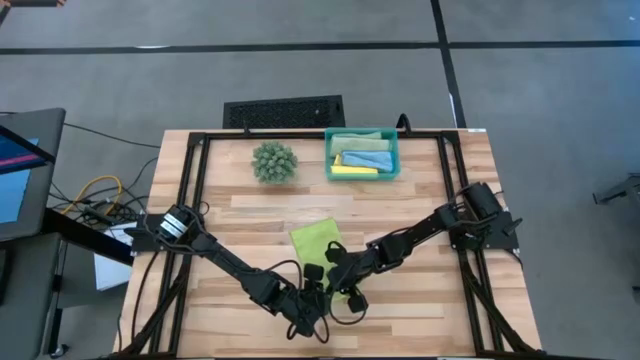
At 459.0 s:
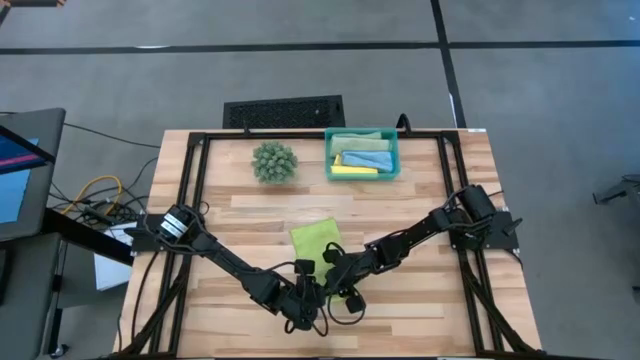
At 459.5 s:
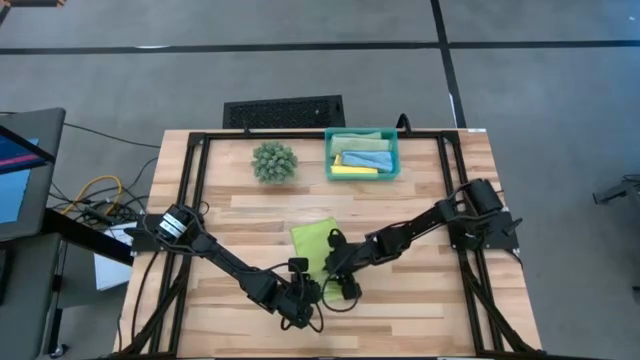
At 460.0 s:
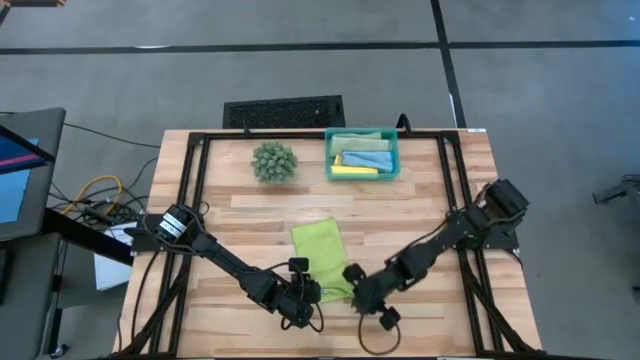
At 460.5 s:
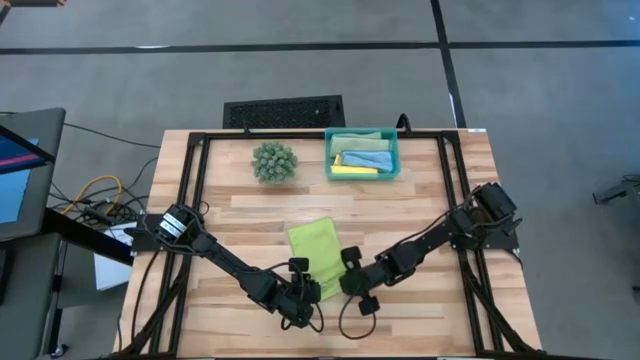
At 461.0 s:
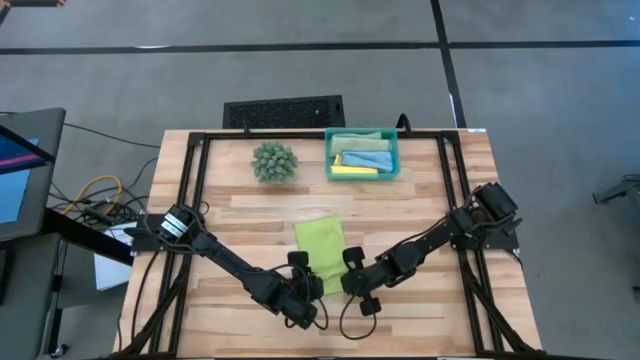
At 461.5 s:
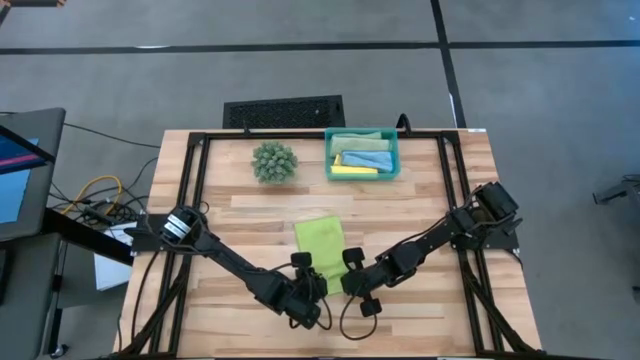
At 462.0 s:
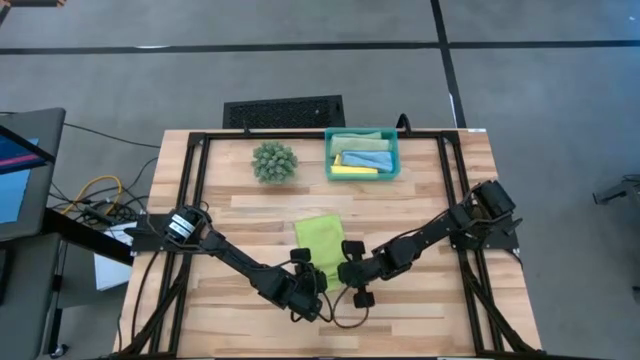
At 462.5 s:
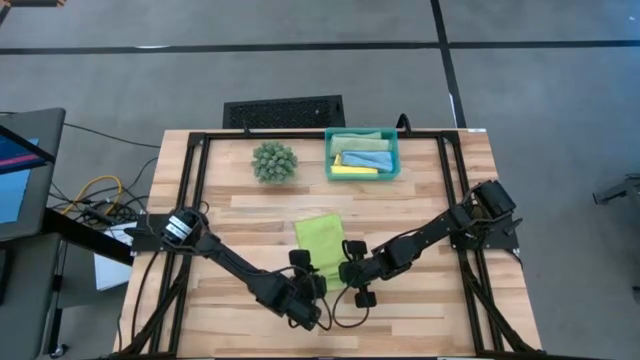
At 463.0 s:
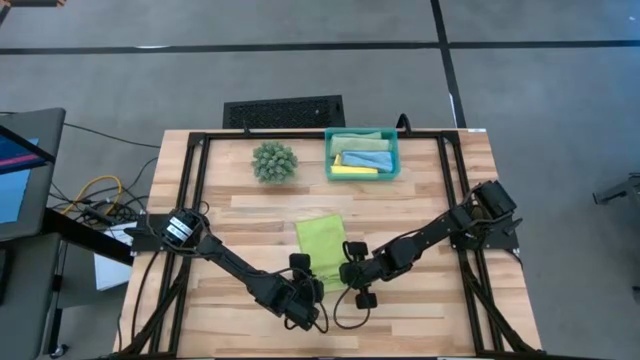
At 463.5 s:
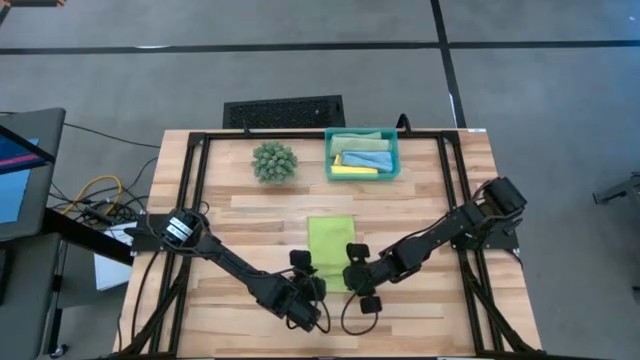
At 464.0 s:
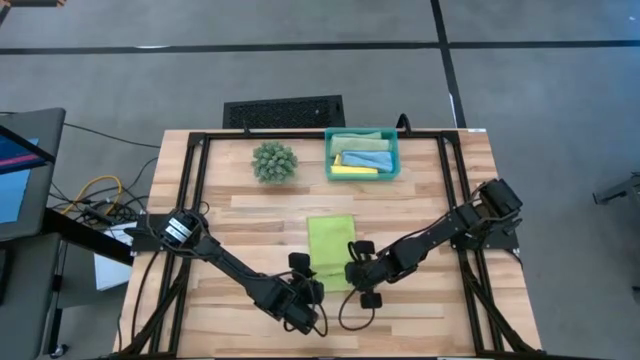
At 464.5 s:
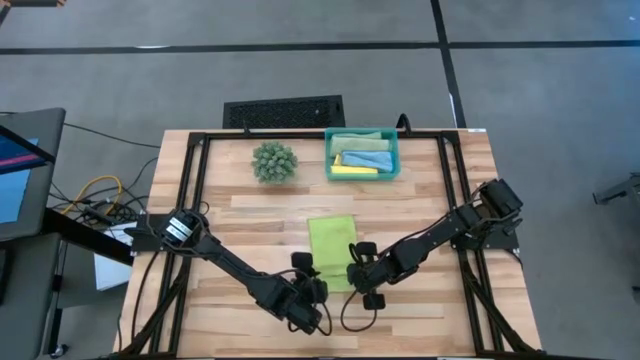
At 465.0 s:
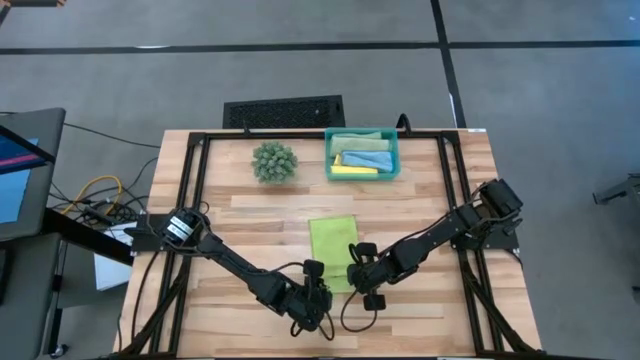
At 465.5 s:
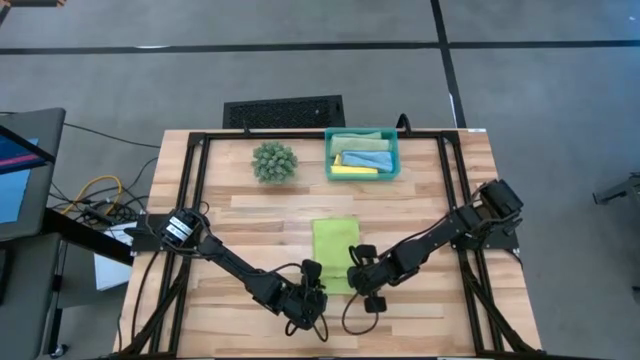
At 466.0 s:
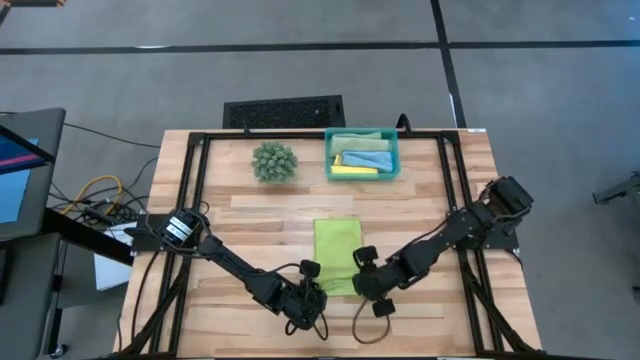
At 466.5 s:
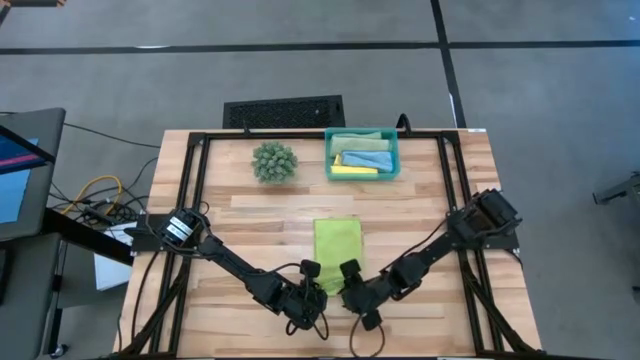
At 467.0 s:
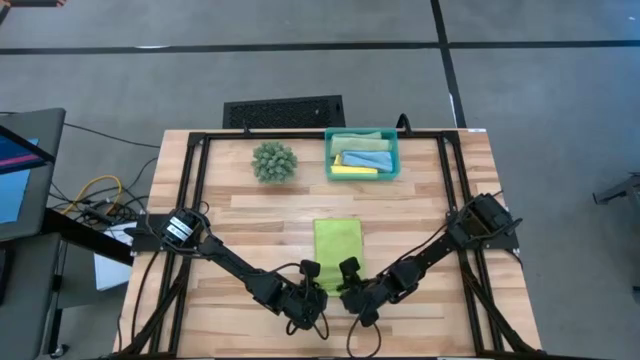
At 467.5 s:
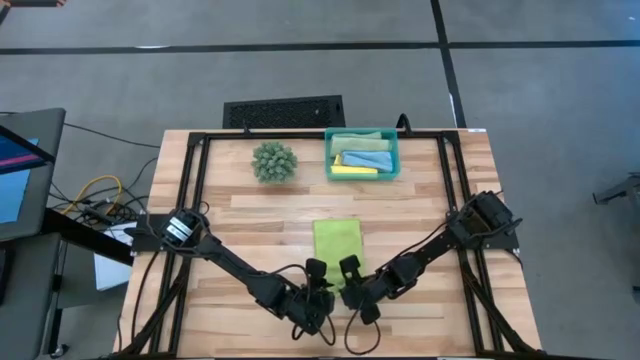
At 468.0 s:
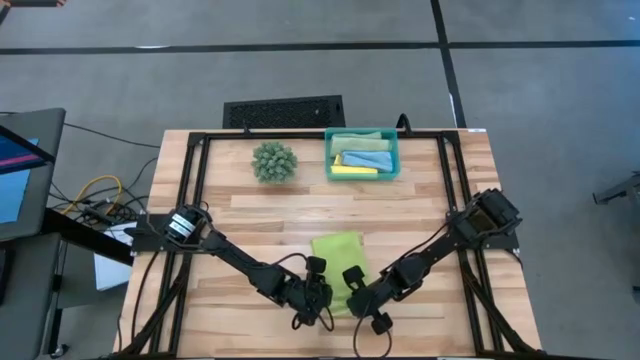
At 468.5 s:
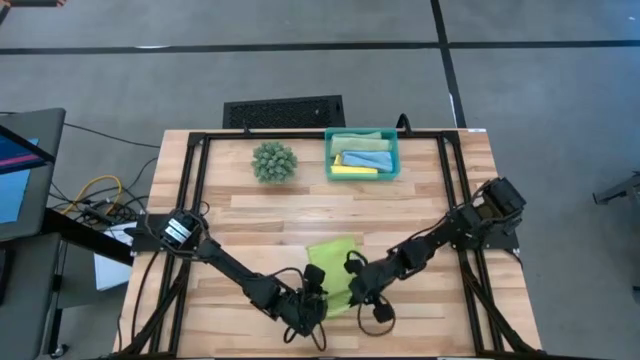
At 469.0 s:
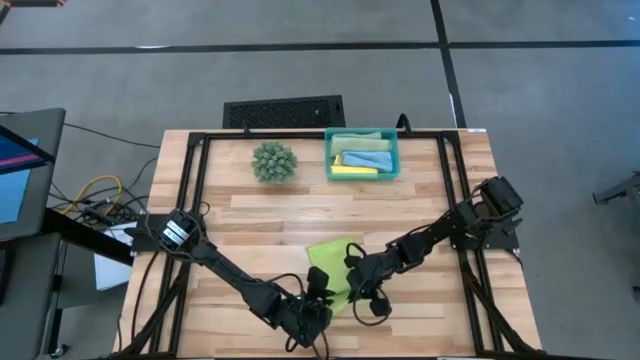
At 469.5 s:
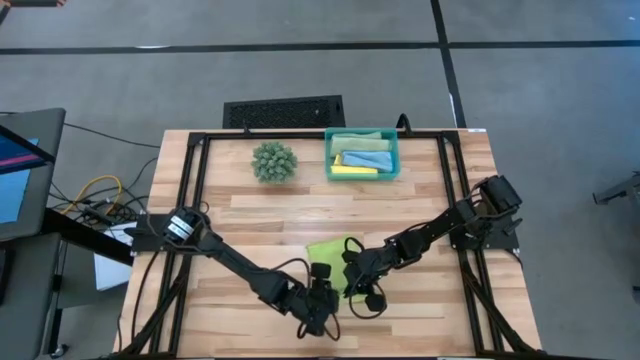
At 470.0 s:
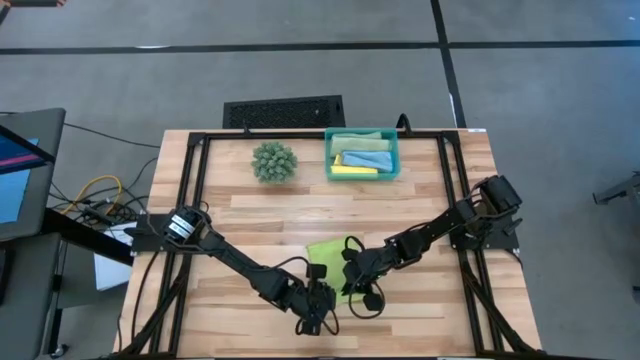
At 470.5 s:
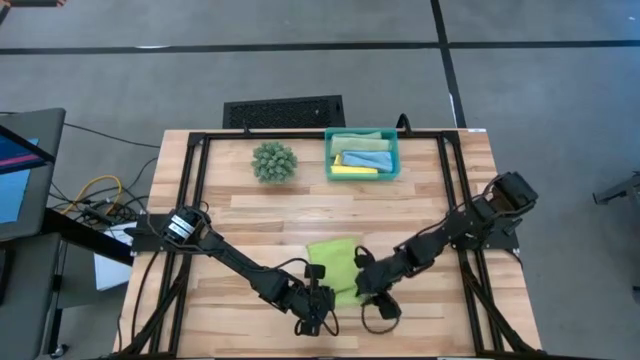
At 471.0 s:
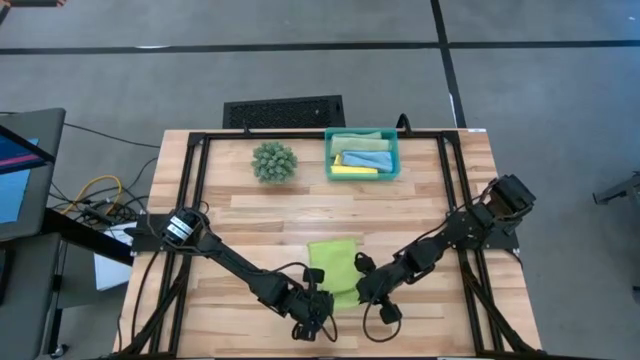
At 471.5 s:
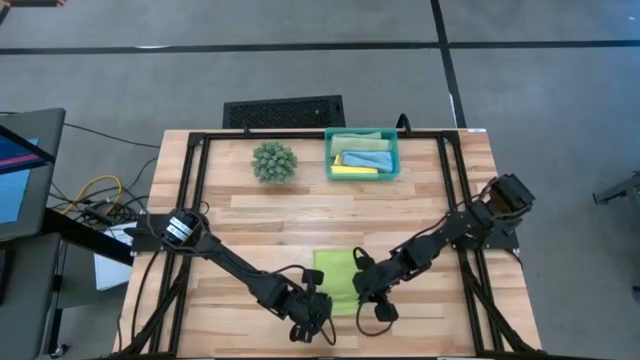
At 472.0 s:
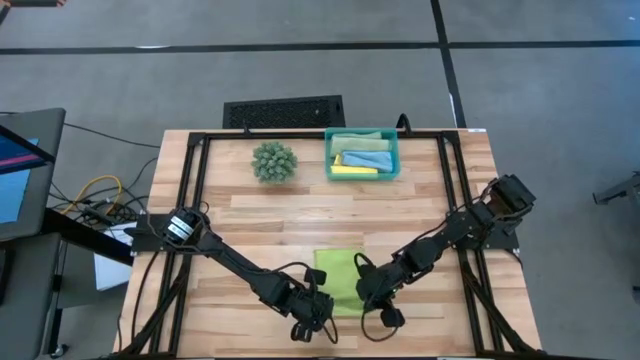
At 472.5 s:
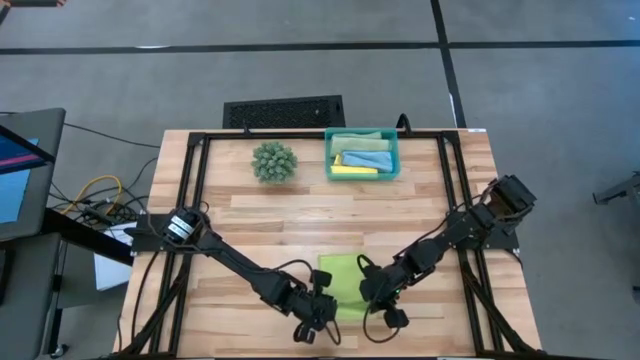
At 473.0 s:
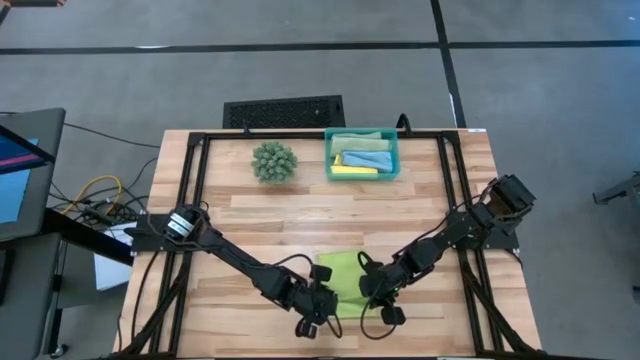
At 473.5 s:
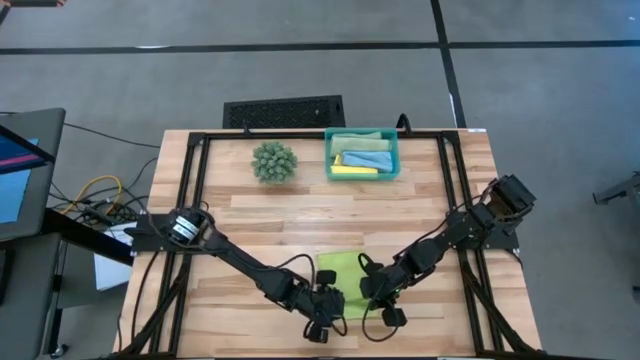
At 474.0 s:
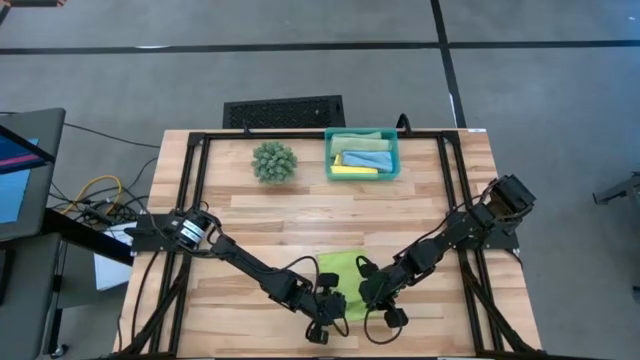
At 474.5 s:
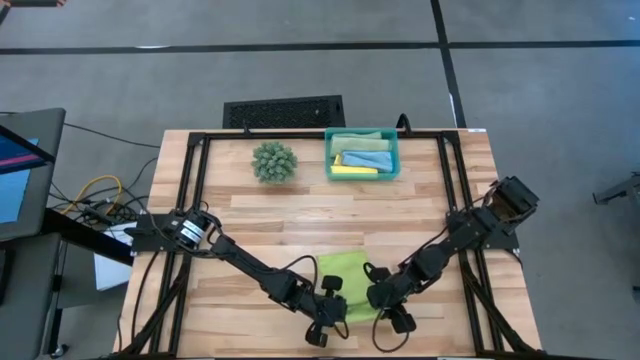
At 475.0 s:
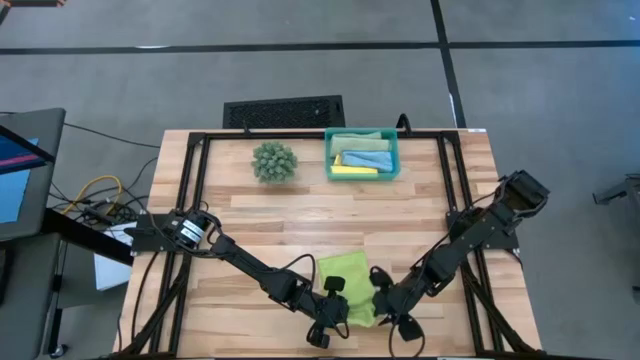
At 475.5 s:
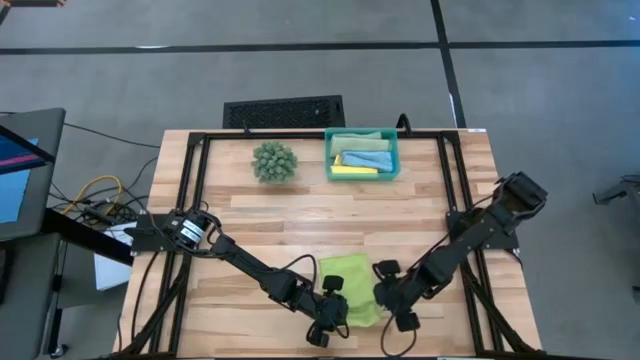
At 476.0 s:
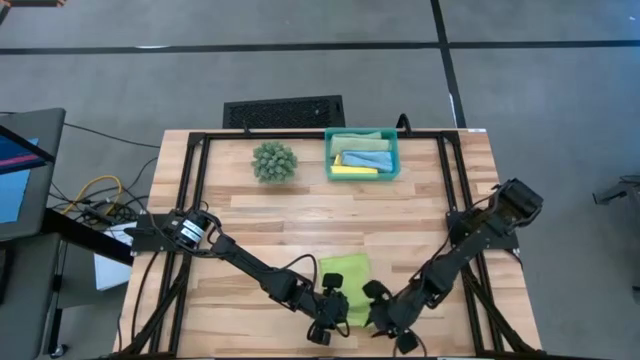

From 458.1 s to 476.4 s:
Task: Roll microfiber towels into tight, uniform cylinder then place into a basket
Roll the green microfiber cloth

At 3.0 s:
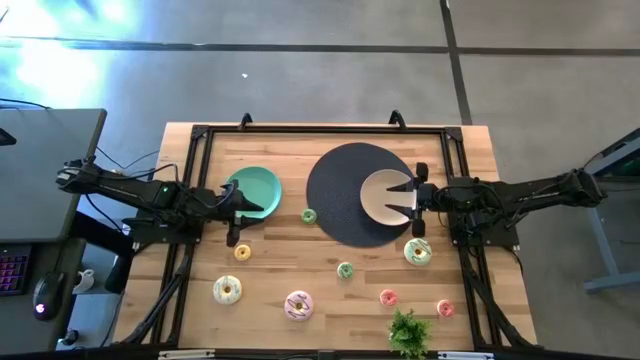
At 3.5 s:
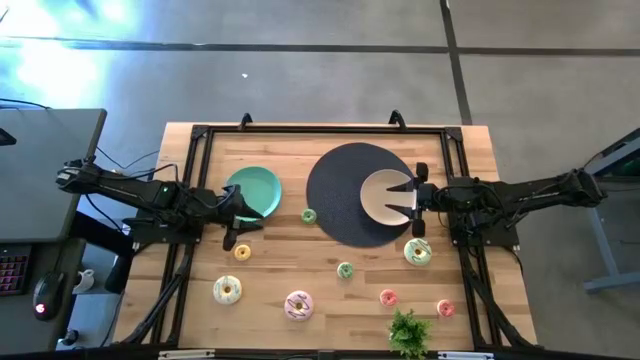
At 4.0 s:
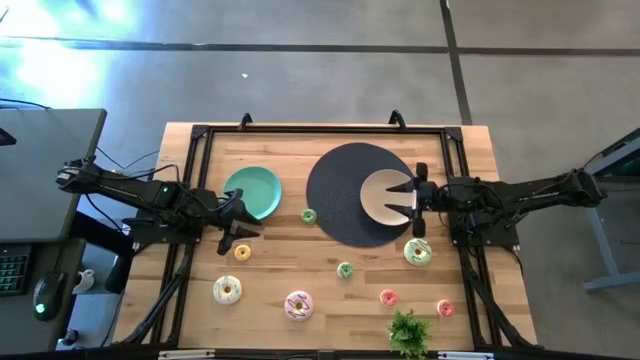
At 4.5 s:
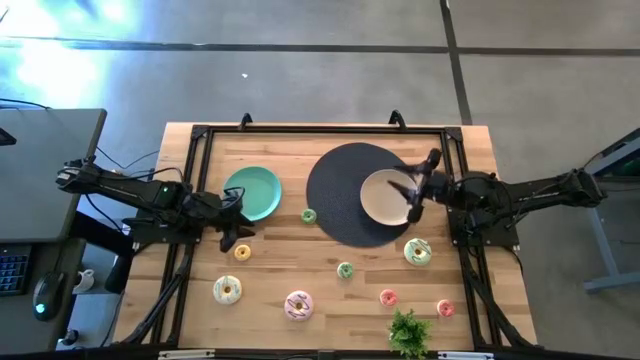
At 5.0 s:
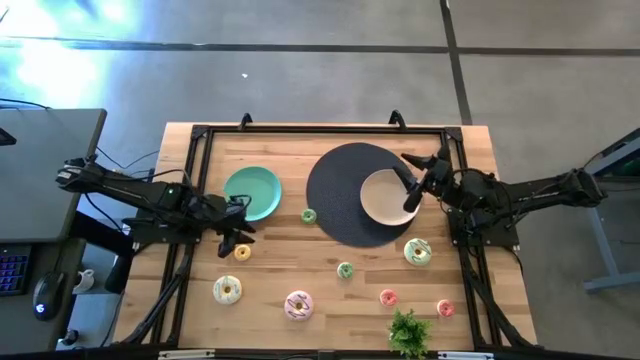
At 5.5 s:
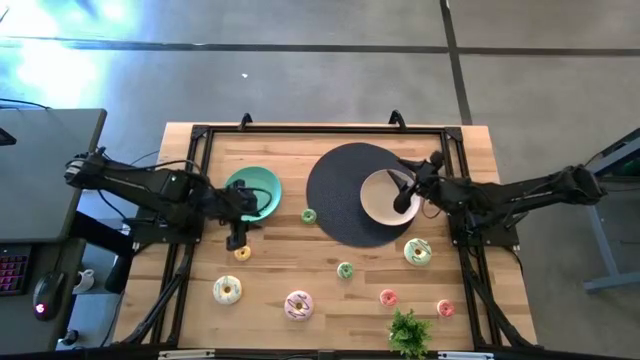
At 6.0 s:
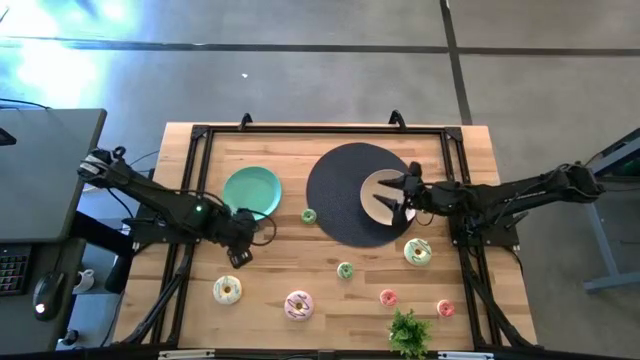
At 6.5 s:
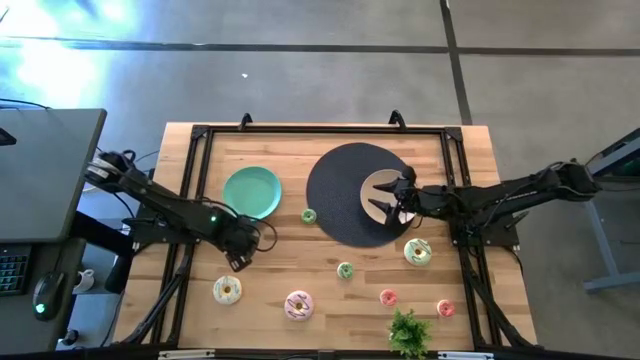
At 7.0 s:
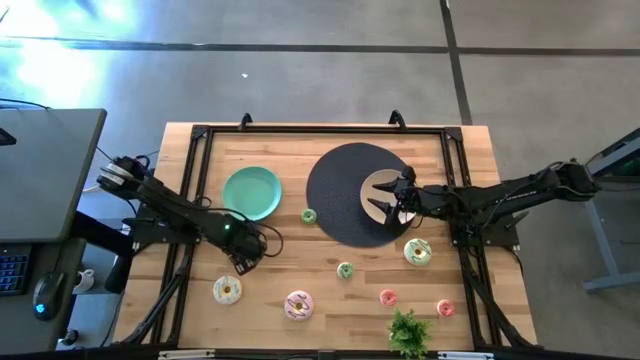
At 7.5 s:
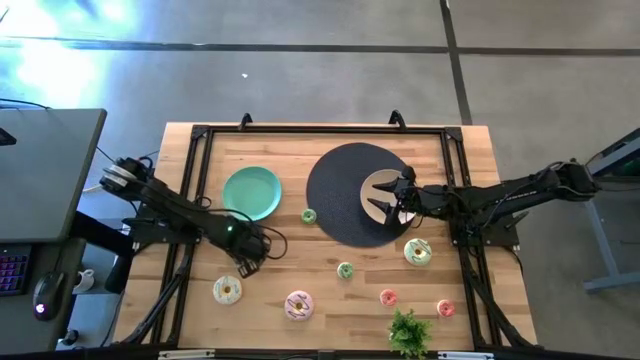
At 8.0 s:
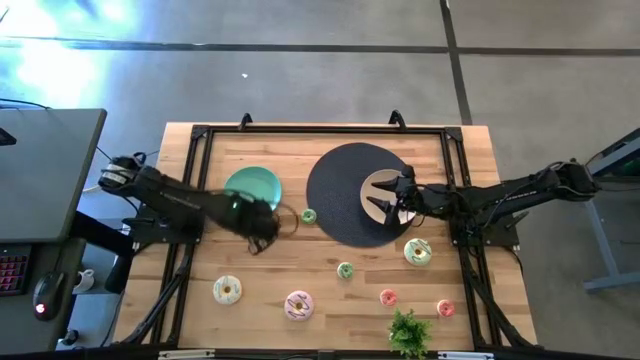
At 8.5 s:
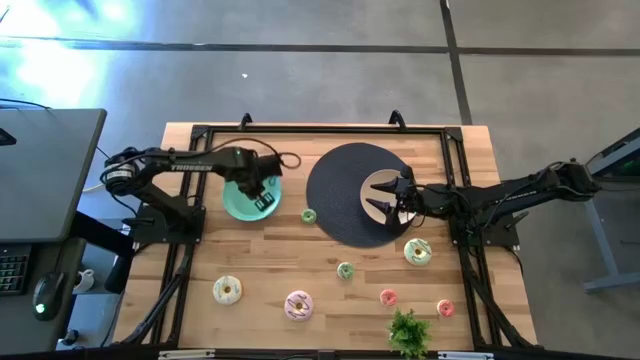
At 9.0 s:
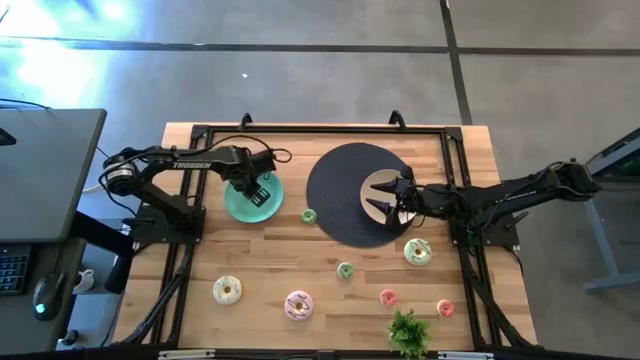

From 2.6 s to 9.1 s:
Task: Pick & Place donuts
Put the small yellow donut onto the blue plate
